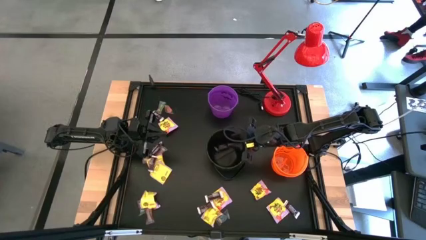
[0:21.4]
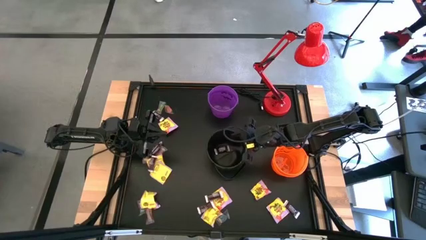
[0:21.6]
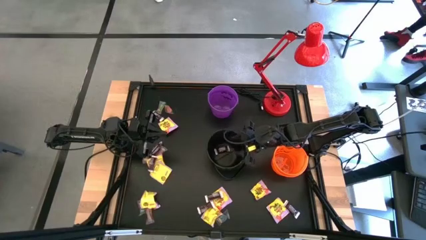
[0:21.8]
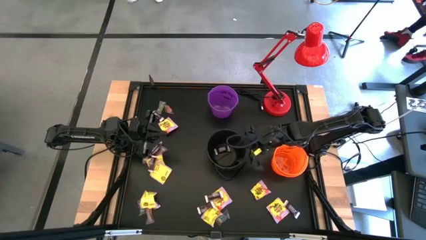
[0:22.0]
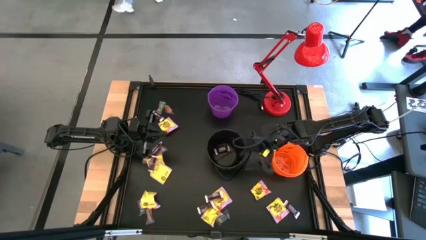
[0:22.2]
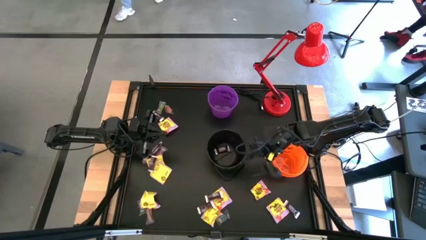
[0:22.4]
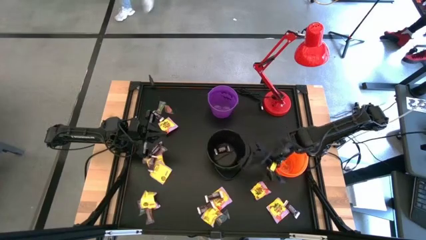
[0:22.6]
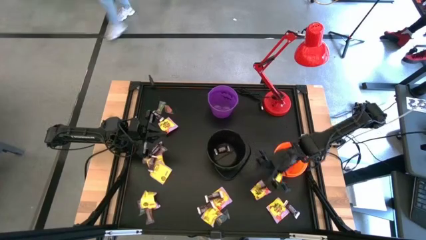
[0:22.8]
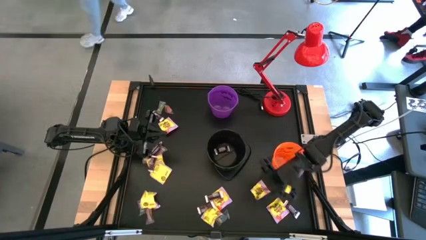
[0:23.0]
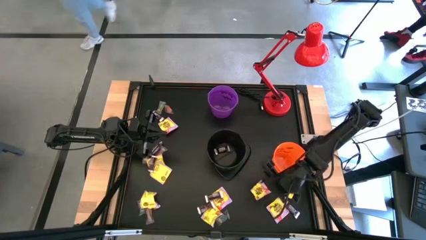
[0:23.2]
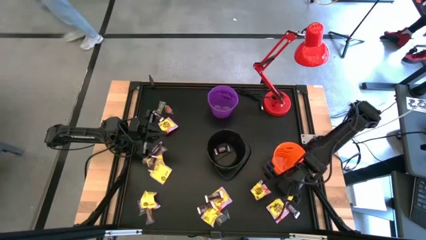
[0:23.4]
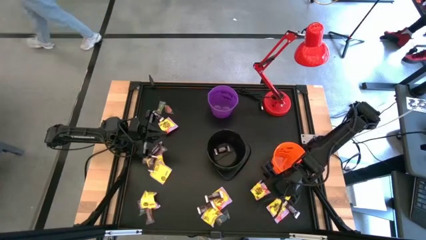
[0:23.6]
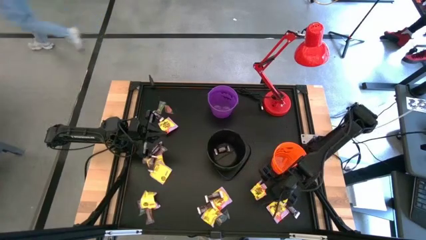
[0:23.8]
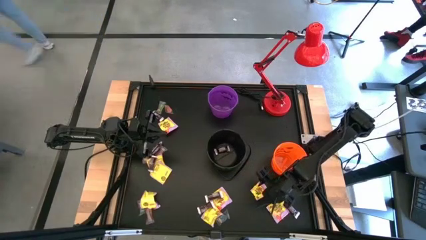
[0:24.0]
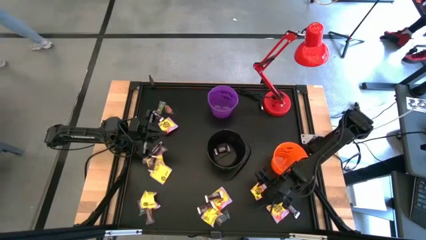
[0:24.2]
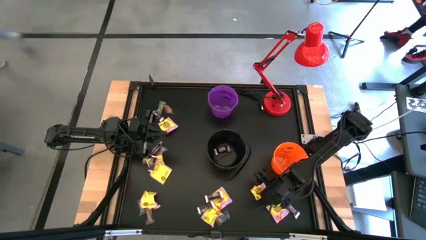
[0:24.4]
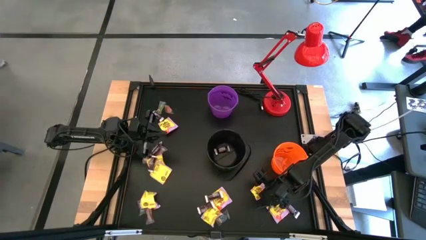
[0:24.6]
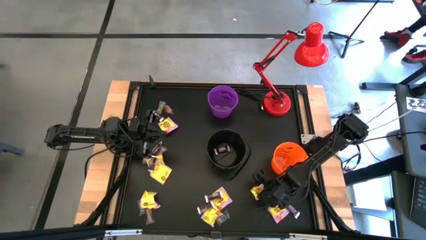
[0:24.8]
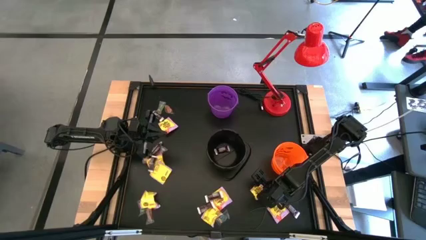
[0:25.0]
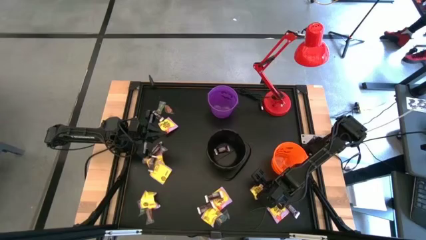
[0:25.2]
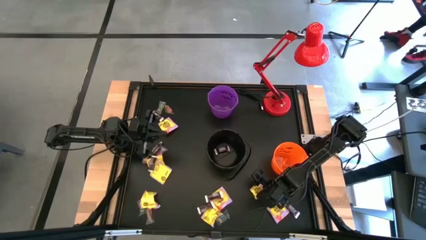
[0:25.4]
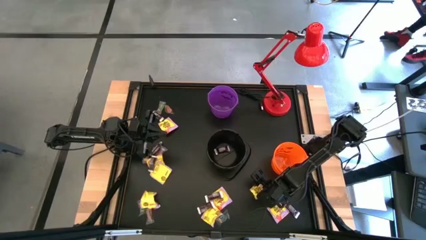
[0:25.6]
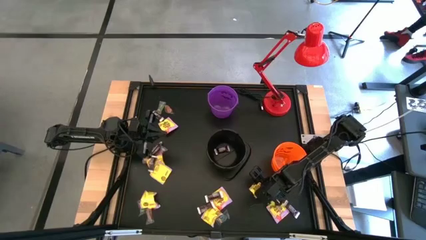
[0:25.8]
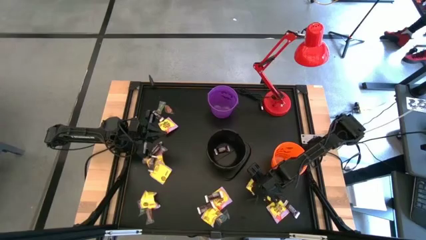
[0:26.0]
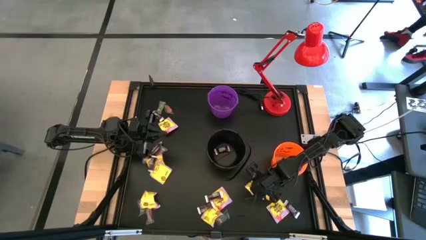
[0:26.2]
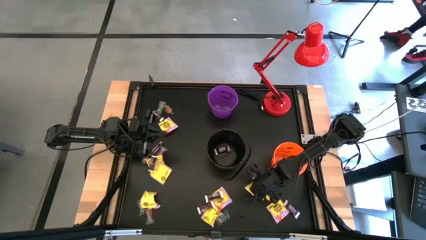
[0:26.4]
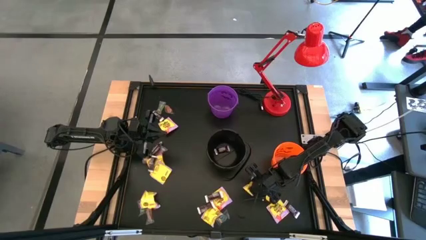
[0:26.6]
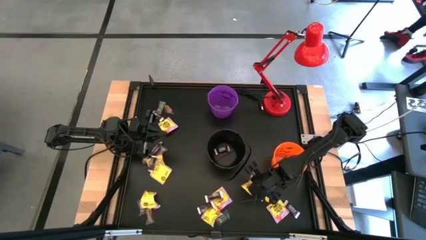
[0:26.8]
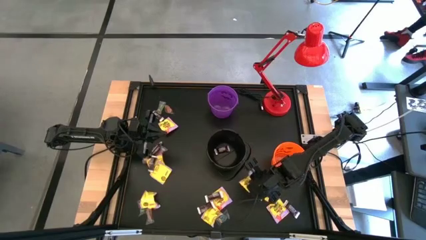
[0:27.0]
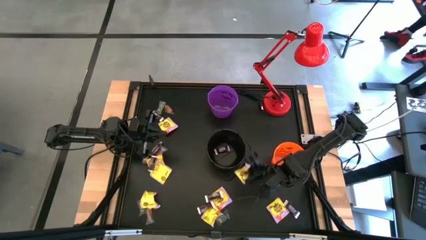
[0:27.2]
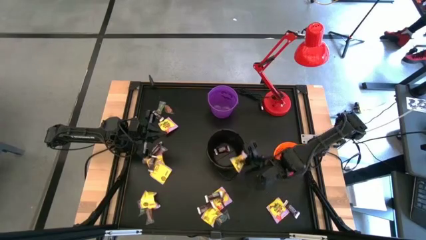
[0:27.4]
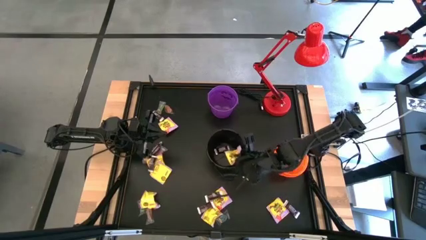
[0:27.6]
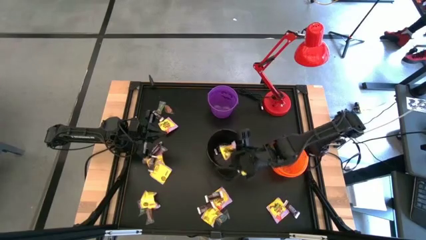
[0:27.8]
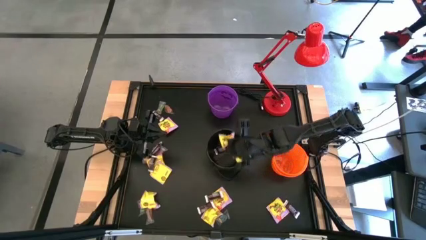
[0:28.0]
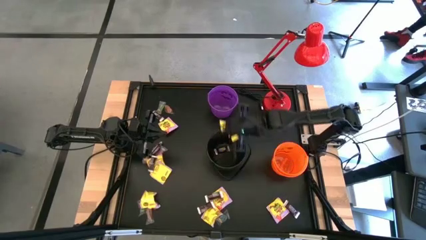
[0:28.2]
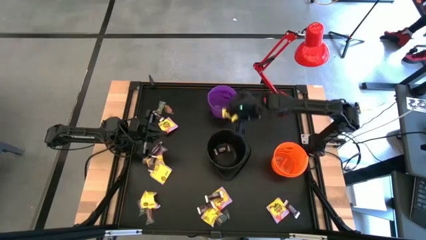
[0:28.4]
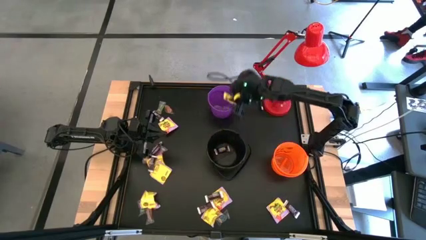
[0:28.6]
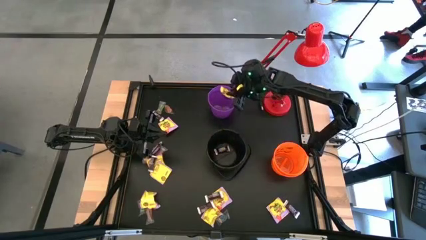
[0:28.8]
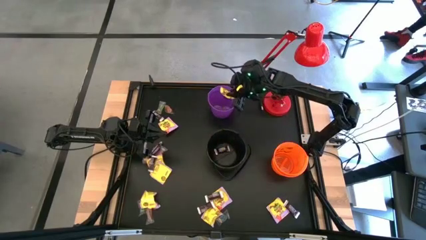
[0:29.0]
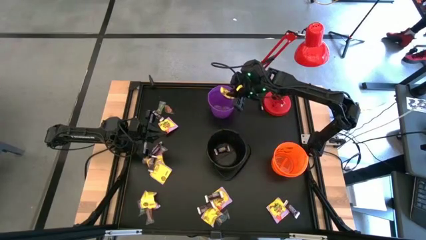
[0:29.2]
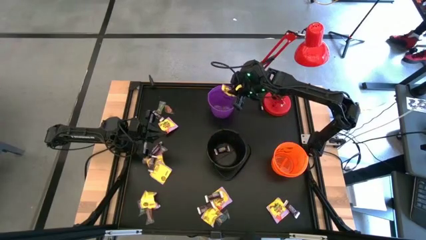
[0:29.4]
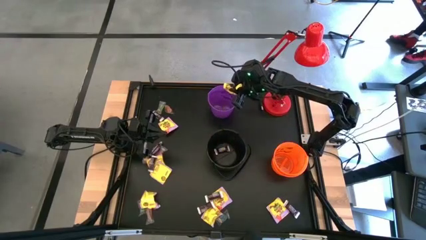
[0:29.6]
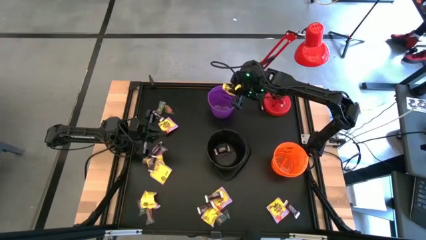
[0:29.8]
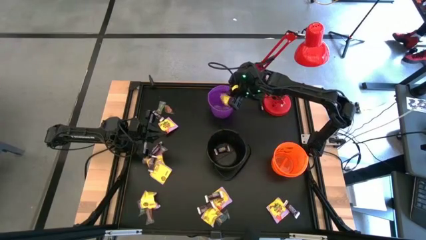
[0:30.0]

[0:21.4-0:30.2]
Task: Sort candy
Put the yellow candy into the purple bucket

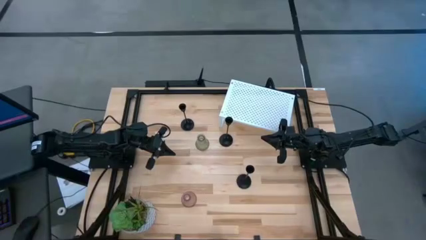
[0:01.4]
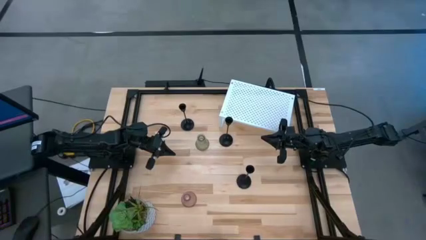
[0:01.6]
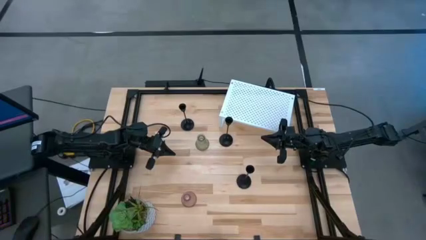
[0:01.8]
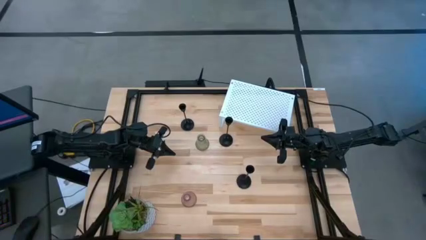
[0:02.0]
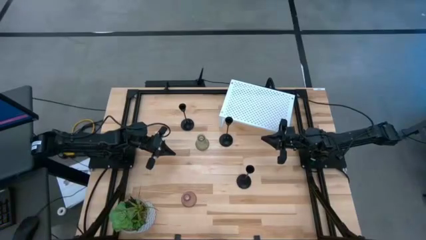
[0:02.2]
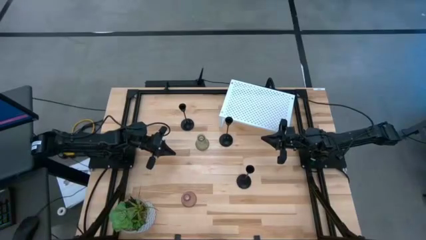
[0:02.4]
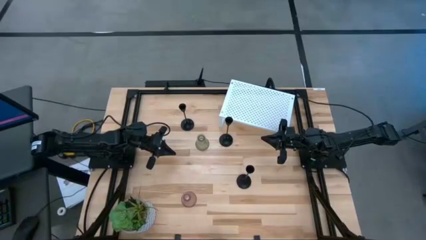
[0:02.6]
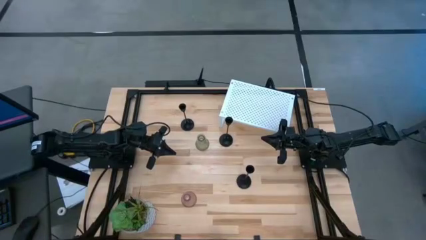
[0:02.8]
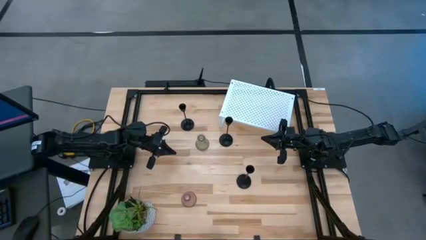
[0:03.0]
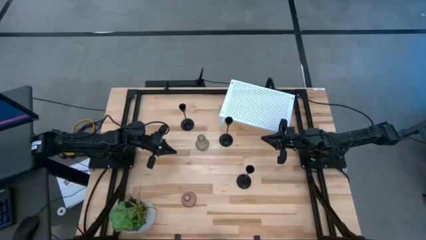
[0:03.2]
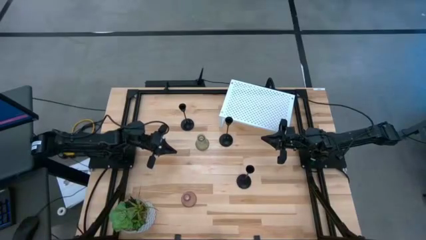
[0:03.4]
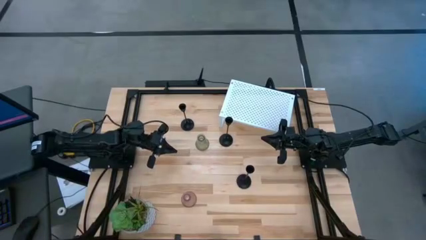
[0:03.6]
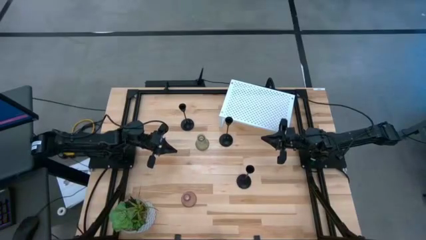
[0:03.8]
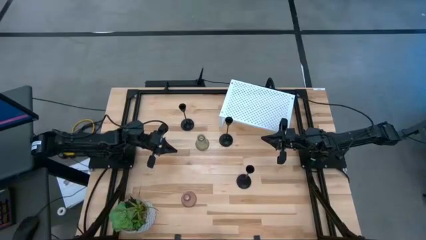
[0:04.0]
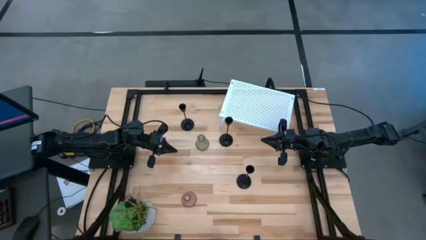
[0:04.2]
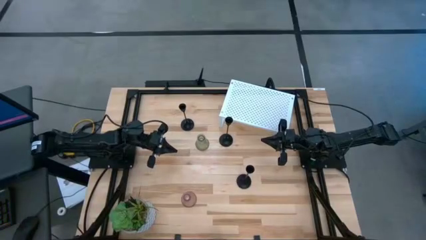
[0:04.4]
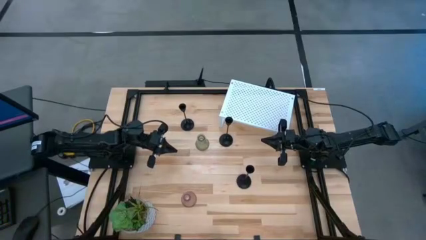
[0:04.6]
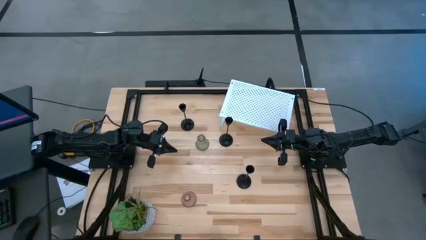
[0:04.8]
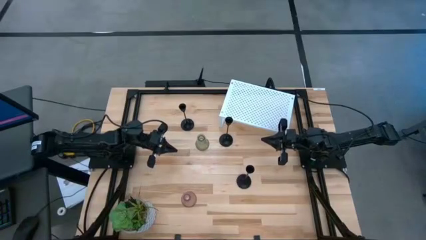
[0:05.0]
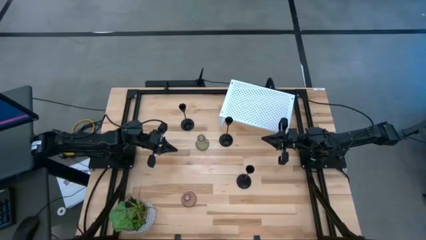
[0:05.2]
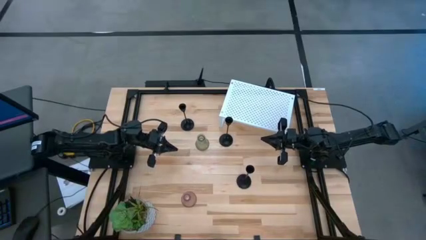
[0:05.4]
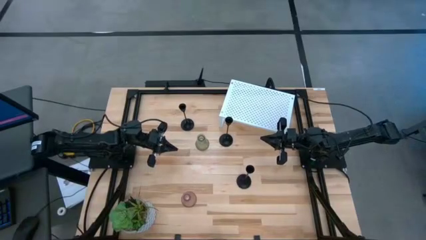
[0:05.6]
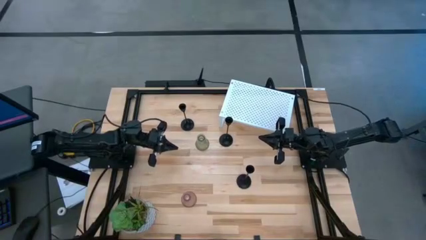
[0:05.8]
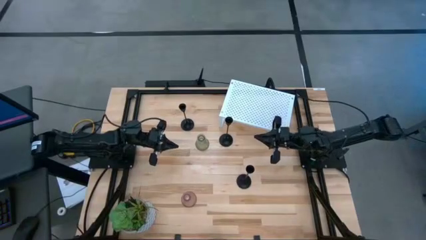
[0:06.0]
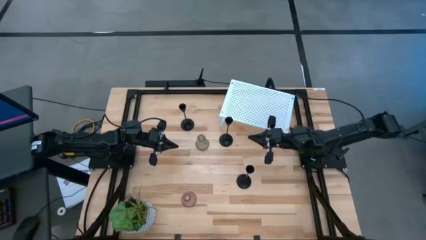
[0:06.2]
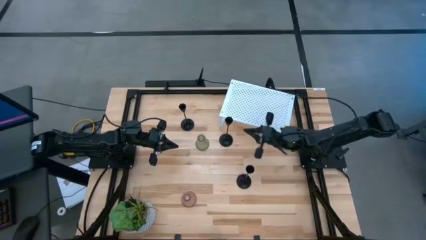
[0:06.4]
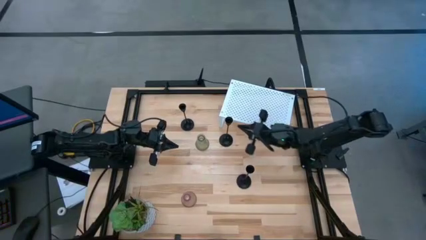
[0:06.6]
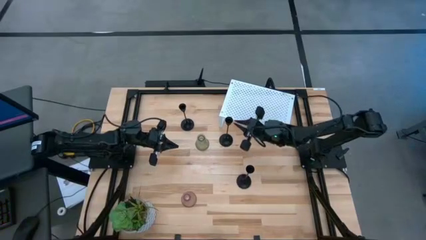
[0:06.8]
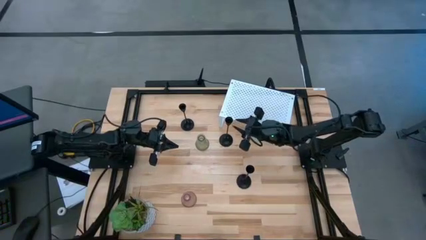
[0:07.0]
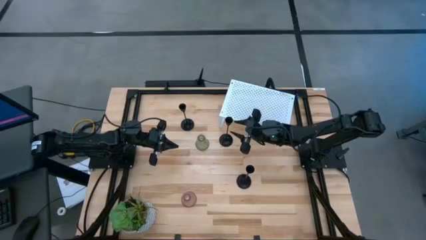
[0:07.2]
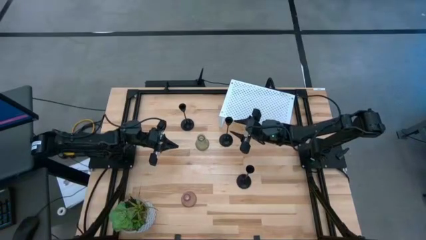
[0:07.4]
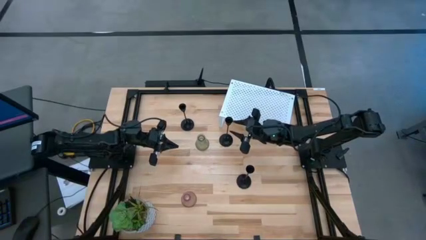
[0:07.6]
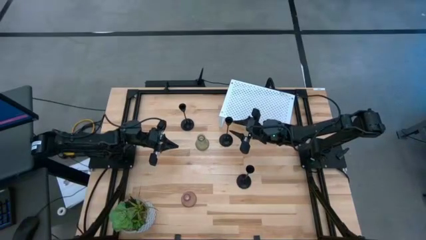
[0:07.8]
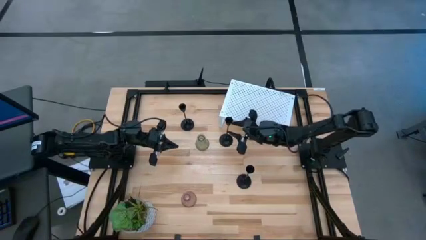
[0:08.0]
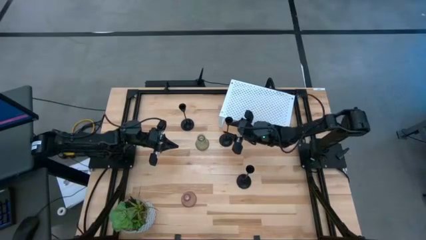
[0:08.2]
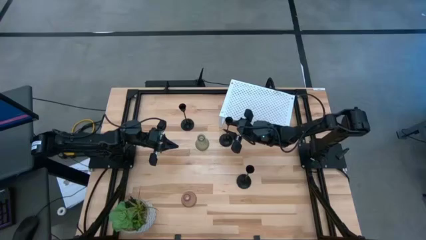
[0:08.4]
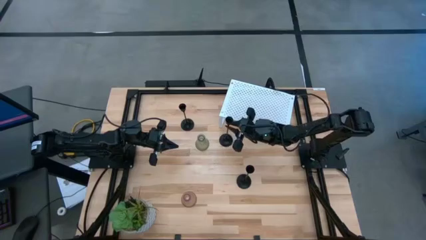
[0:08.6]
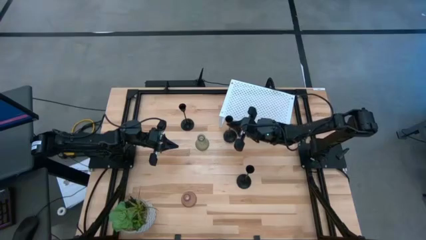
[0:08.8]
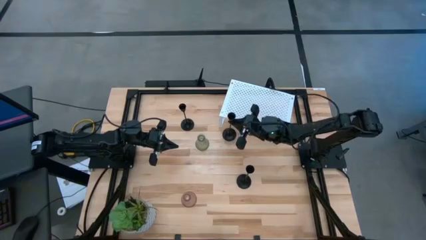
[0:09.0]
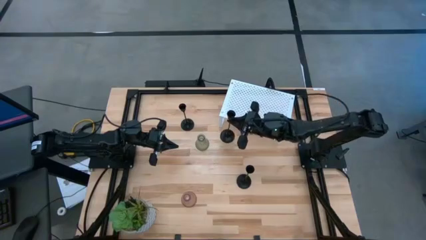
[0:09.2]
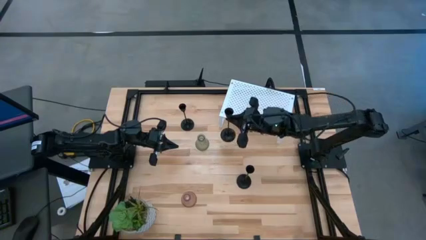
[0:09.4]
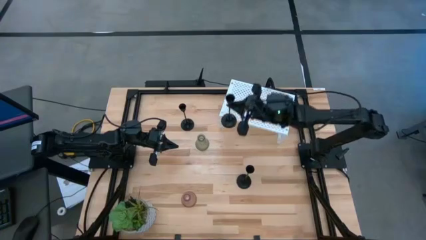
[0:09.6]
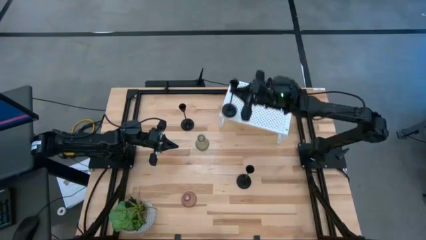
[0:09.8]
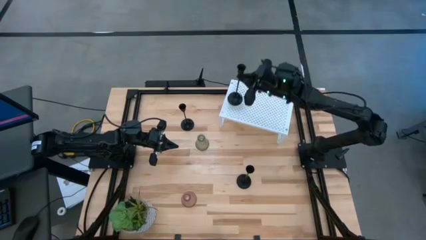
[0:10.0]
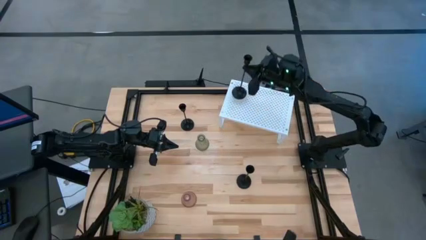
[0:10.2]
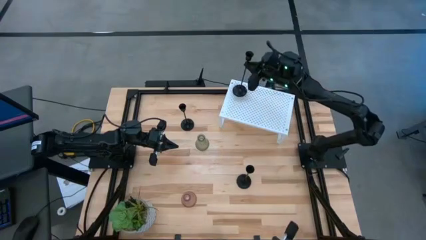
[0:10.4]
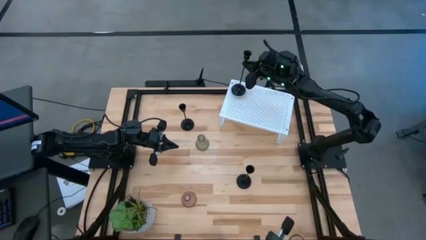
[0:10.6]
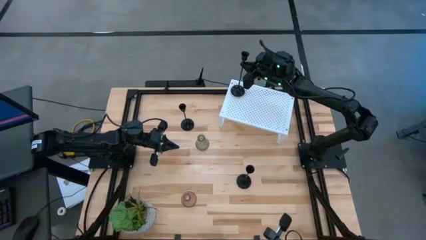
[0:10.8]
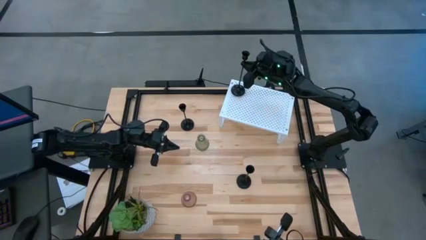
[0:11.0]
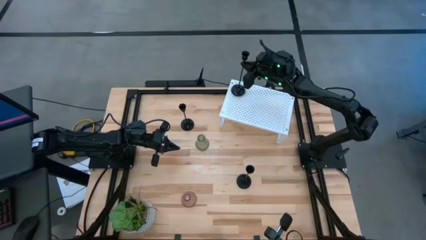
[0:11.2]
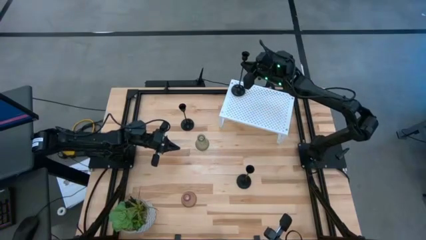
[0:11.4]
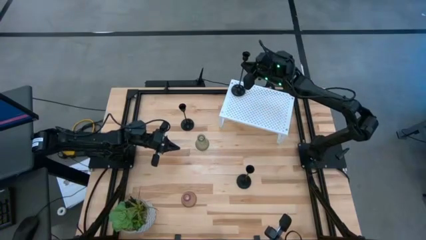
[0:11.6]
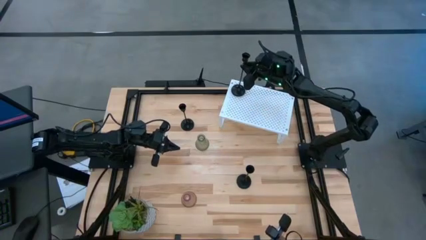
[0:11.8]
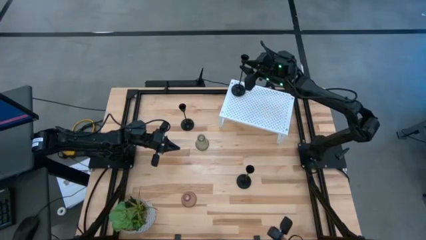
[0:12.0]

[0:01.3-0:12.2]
Task: Pick & Place candle stick holders
Put the middle right black candle holder on the shelf
